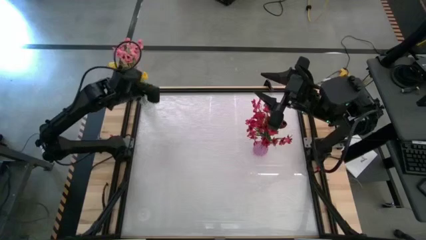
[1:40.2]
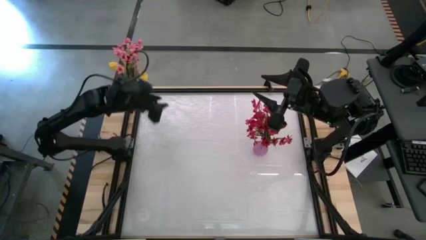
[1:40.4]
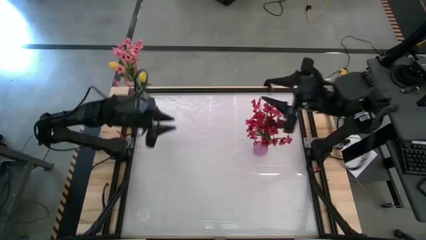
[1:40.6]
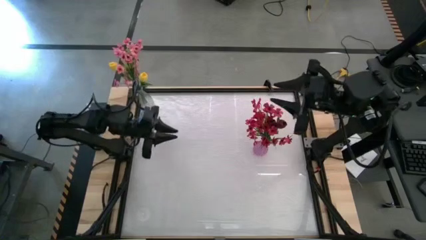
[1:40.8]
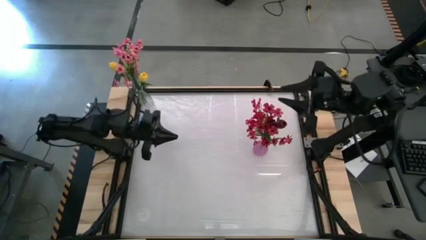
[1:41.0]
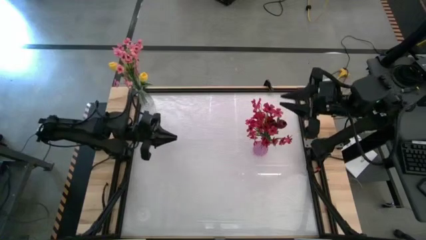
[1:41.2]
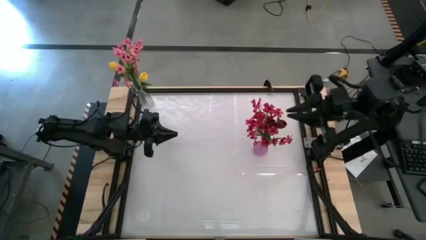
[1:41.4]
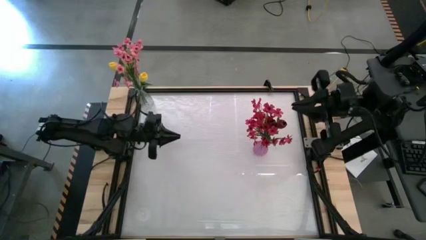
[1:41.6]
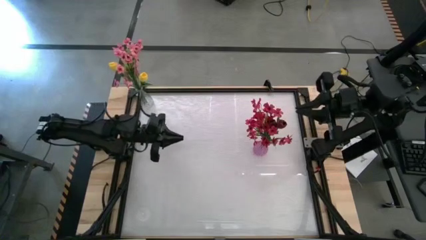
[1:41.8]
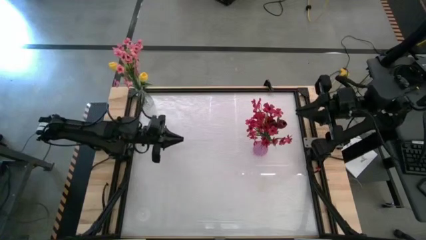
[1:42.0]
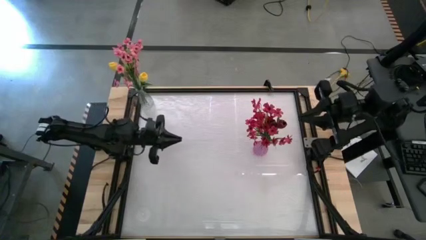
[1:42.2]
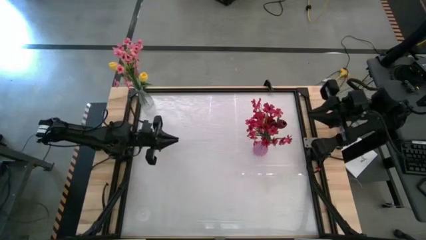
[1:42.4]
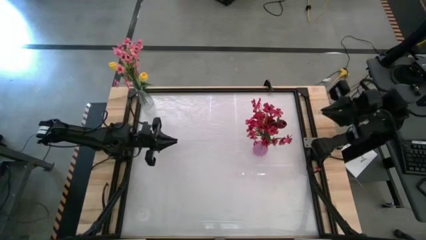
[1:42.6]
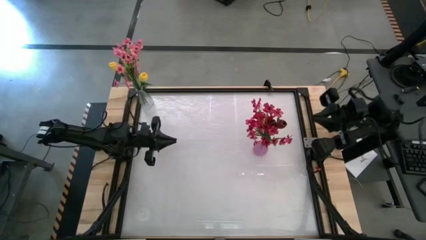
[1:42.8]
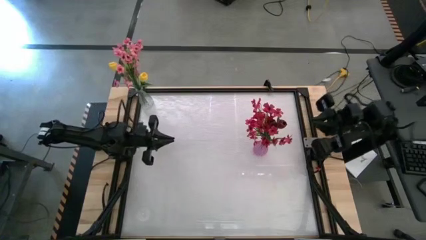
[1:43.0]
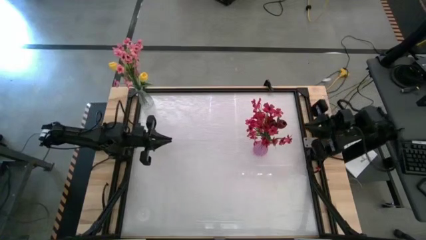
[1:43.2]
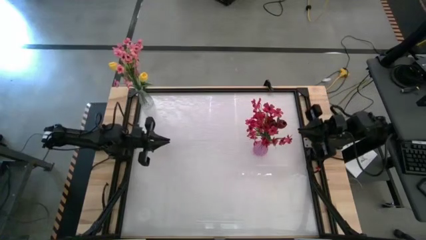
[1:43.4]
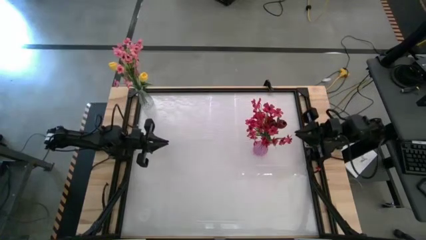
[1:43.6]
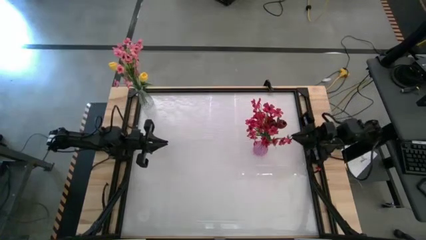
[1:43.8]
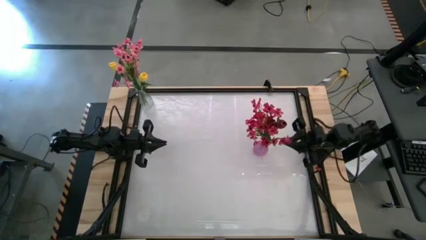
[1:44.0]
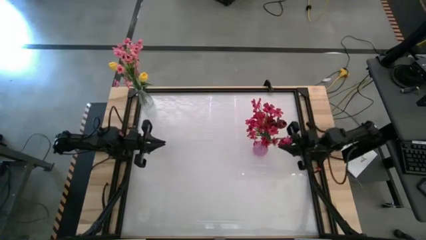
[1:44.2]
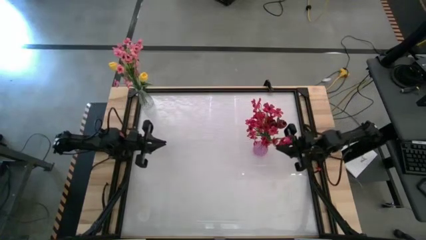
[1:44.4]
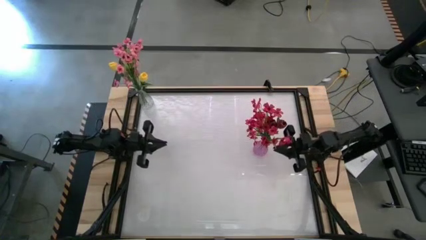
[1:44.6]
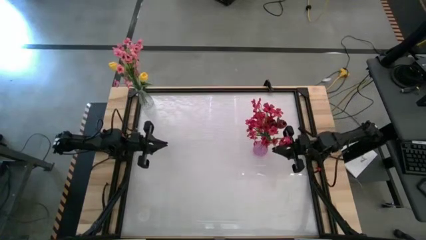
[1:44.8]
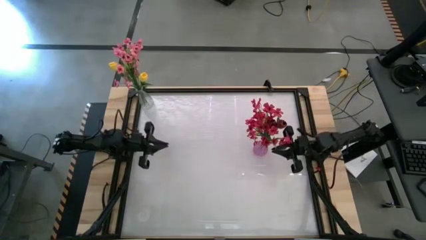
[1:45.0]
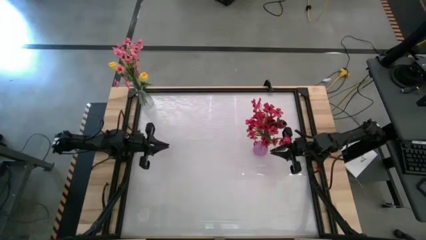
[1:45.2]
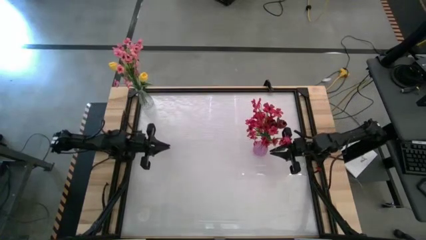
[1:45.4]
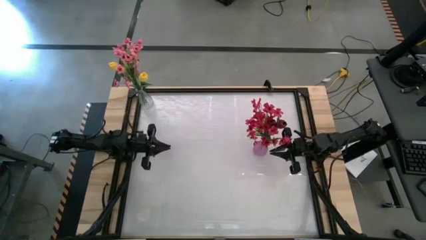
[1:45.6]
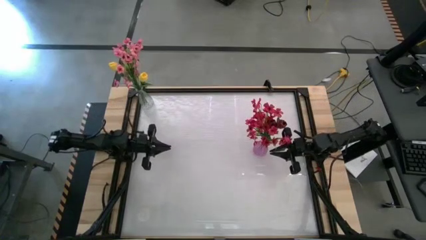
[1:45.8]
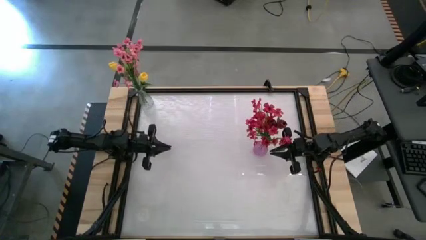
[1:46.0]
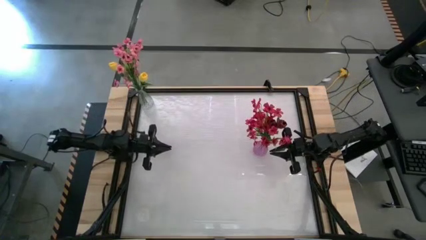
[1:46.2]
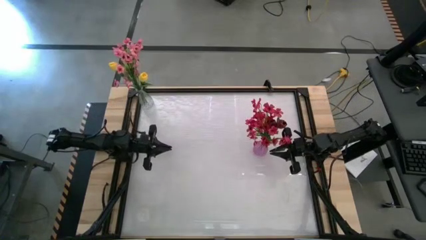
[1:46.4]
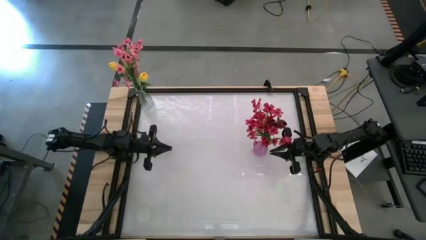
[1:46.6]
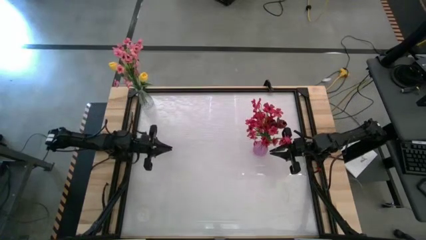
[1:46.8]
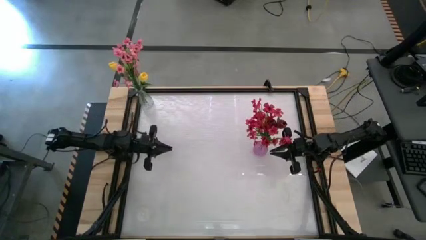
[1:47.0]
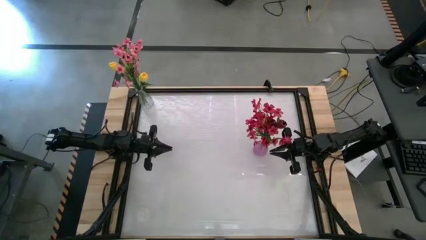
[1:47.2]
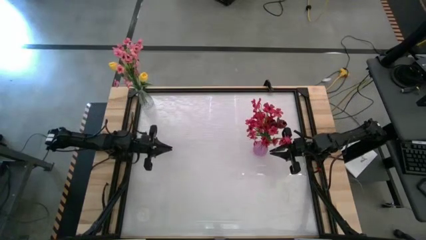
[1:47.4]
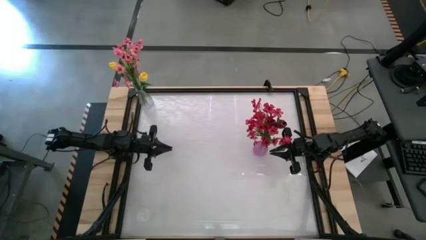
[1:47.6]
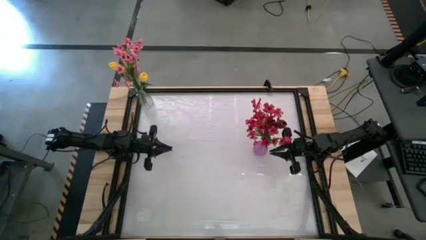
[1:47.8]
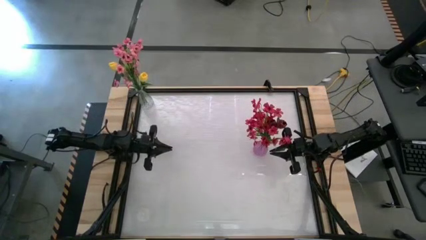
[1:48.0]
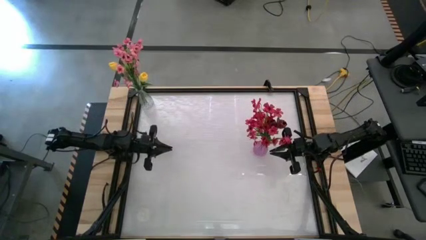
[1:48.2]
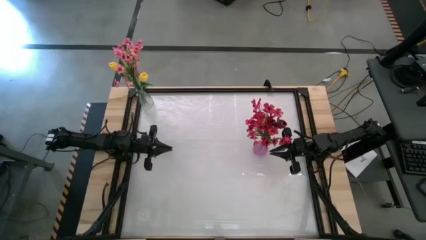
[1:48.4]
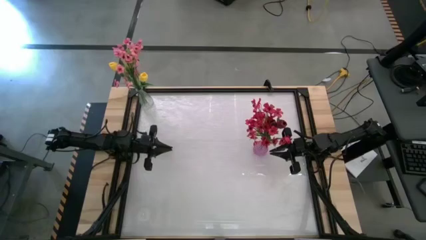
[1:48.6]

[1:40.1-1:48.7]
Task: Sort flowers into vase by color
Return to Home Position

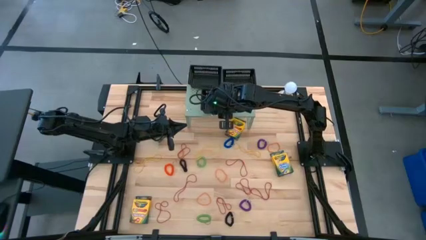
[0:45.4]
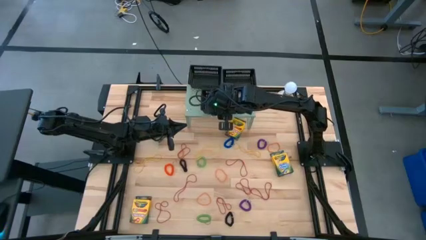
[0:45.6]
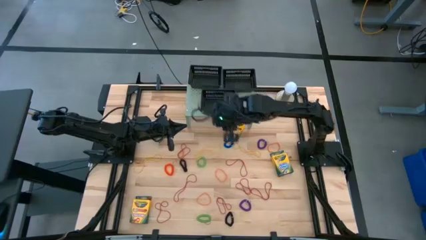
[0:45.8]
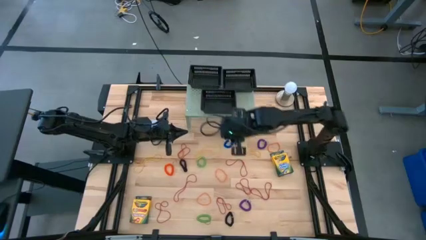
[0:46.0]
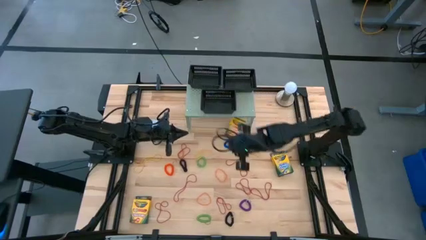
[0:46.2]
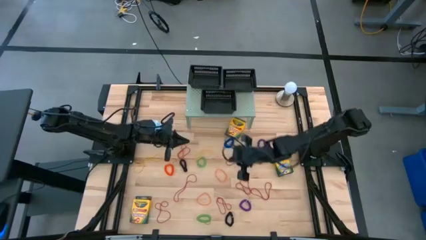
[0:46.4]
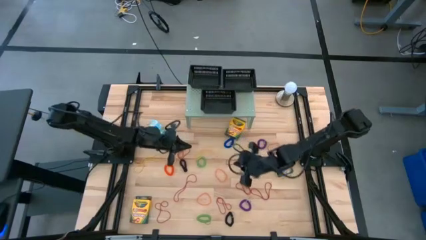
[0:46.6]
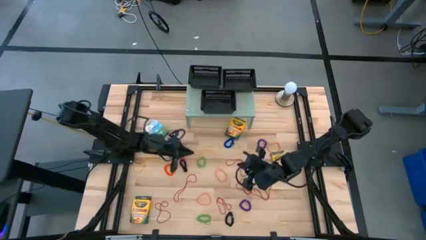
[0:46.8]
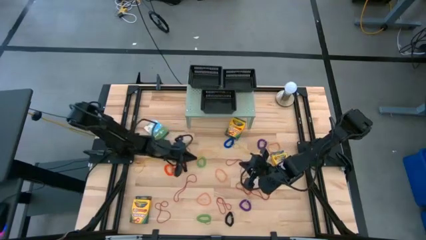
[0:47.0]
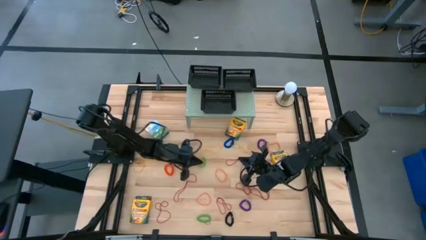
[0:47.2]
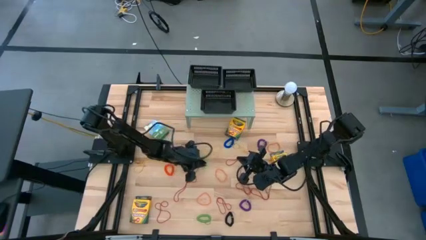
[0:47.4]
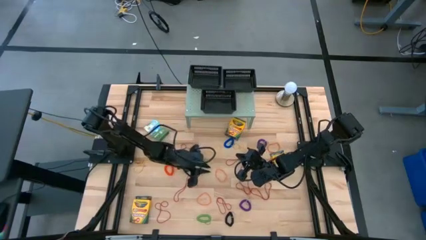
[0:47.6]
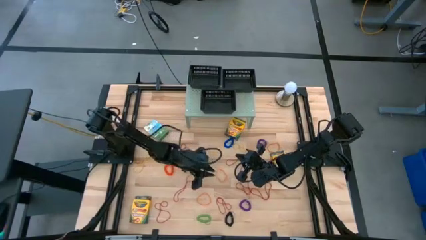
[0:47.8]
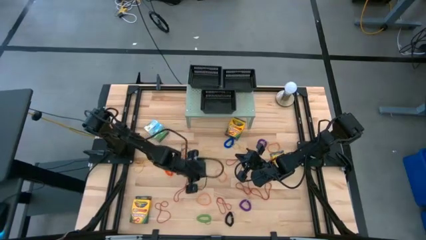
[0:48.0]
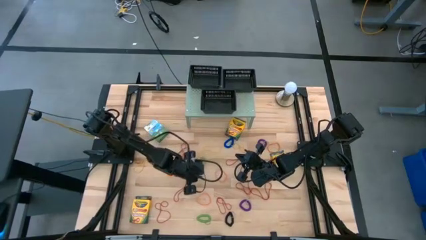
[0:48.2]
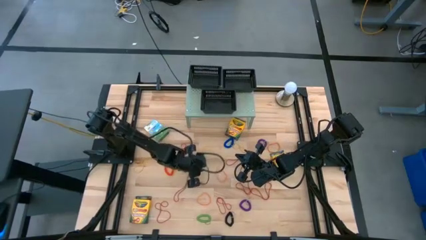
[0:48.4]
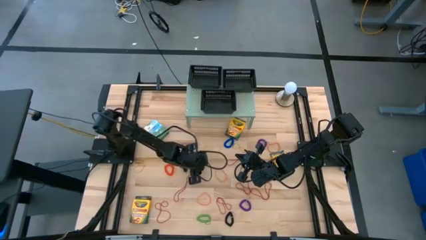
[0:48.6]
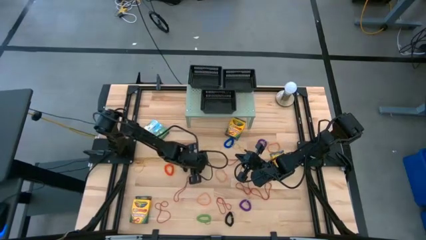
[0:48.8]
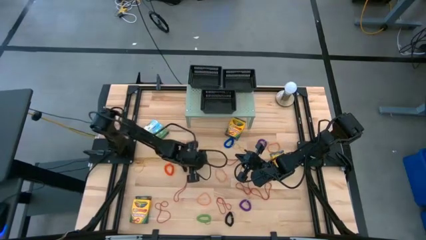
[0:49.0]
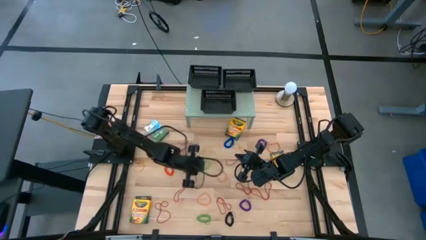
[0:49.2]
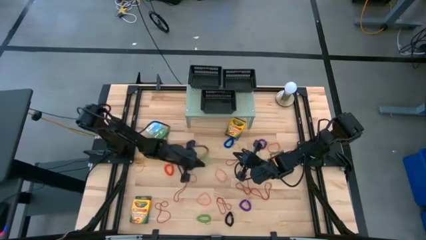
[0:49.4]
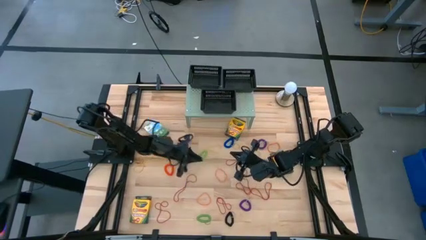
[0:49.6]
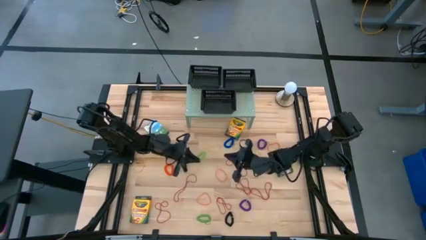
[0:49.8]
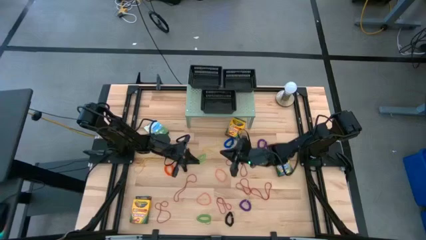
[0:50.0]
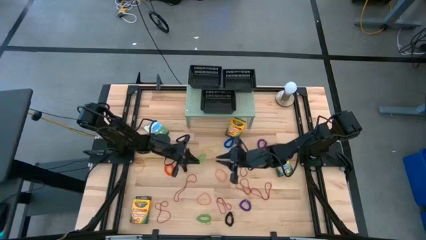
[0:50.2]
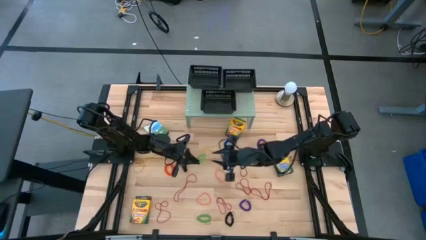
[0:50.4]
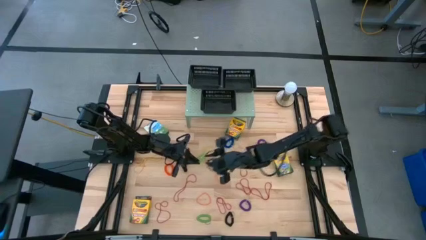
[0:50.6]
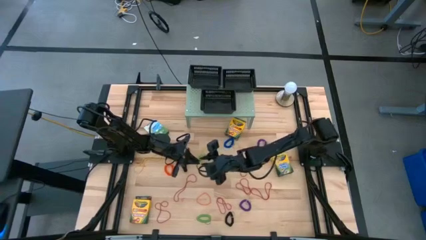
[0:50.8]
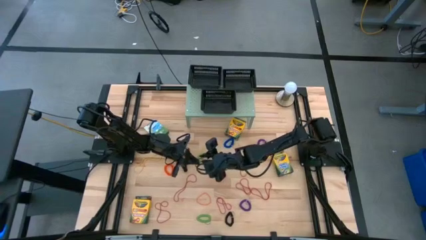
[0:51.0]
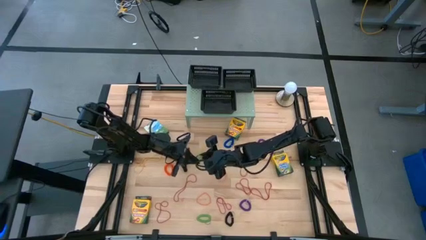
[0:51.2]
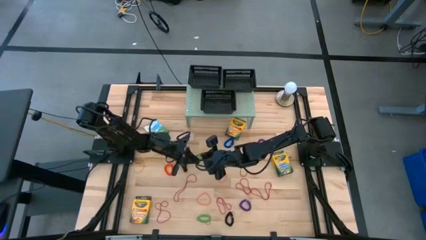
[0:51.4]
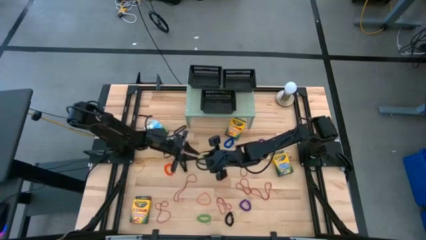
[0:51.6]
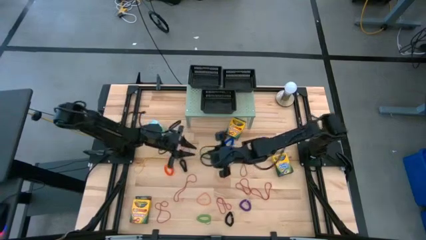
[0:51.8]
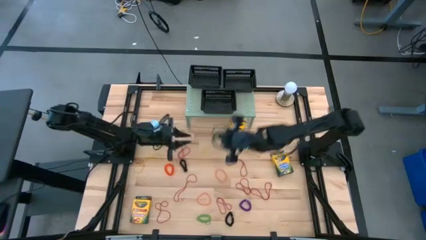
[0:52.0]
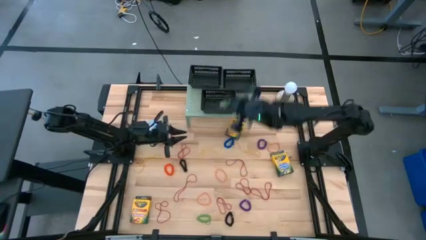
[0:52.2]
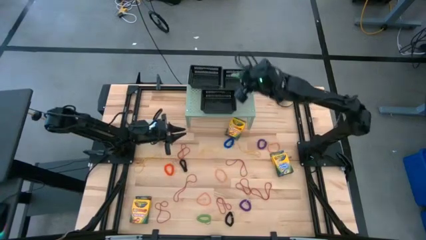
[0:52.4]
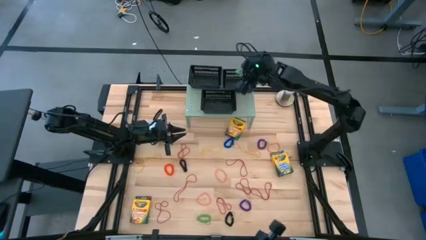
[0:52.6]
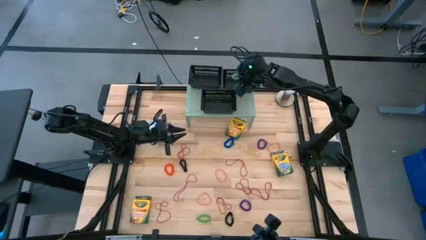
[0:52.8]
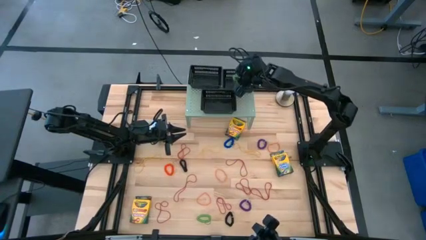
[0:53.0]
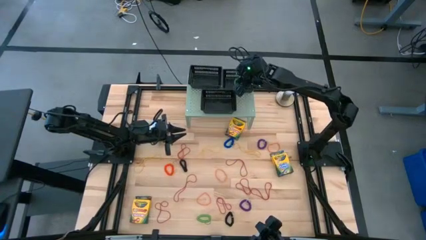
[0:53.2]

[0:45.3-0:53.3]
Task: Pick & Place Office Desk Supplies
Put the green spiral keychain the top right black bin
